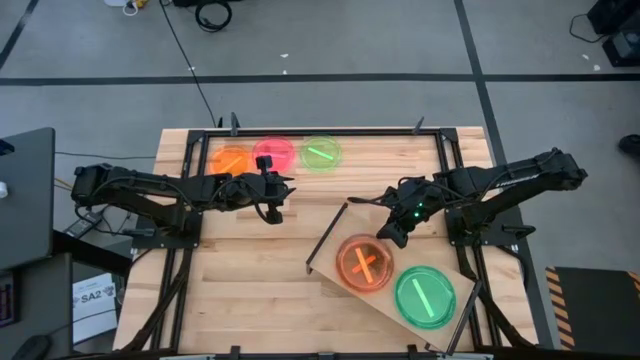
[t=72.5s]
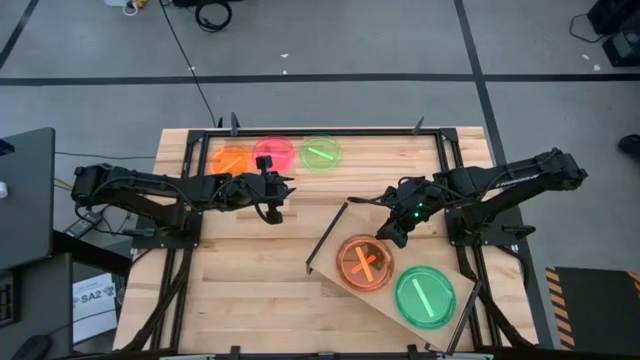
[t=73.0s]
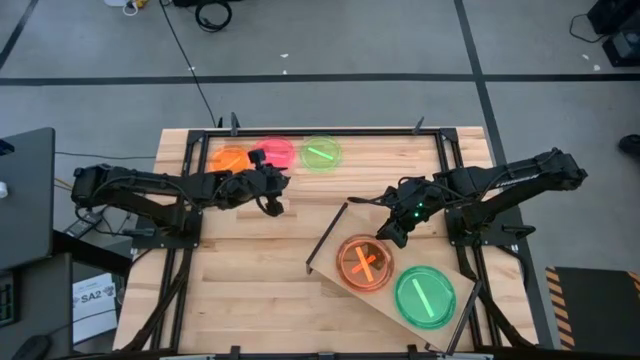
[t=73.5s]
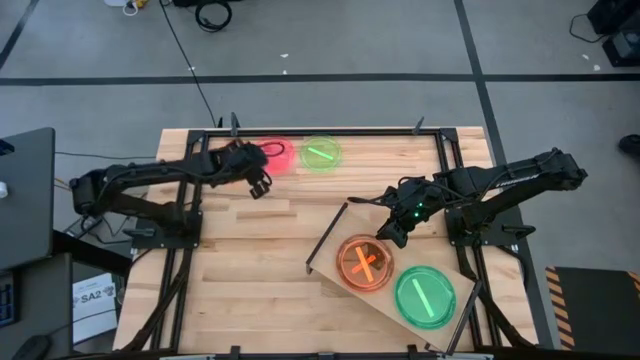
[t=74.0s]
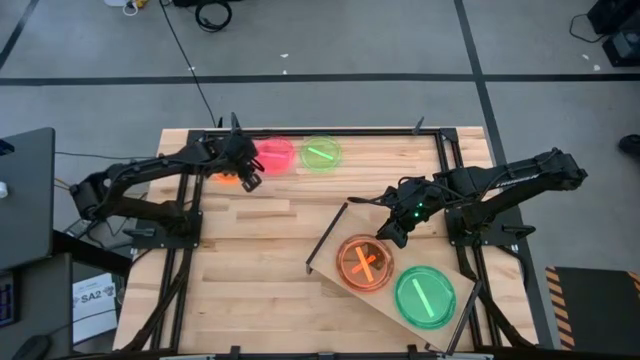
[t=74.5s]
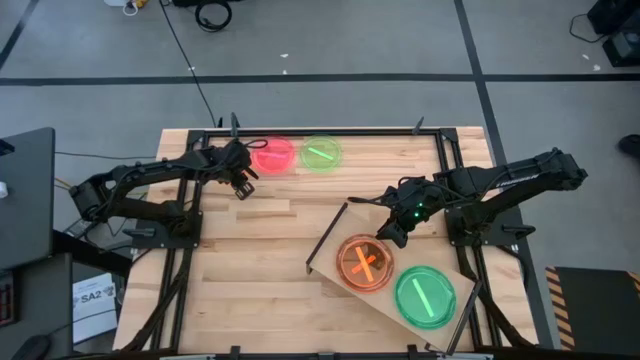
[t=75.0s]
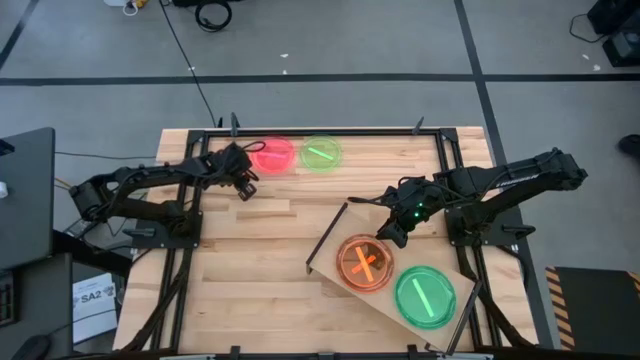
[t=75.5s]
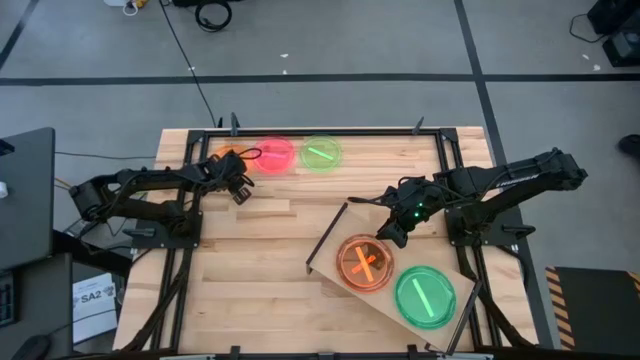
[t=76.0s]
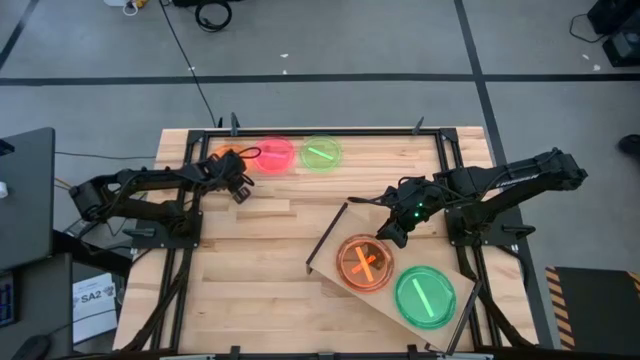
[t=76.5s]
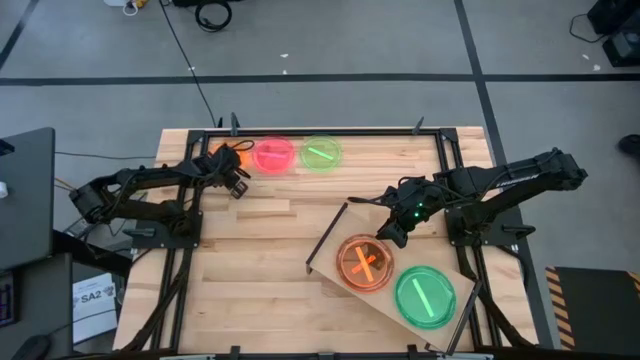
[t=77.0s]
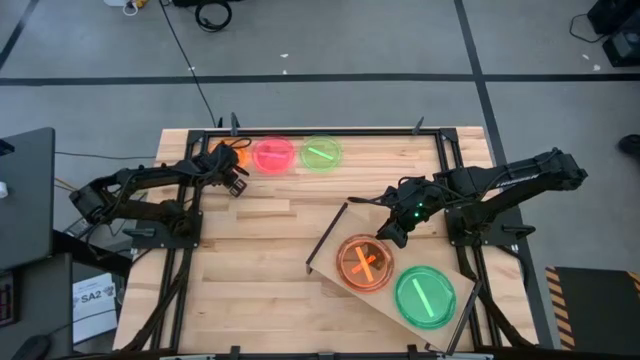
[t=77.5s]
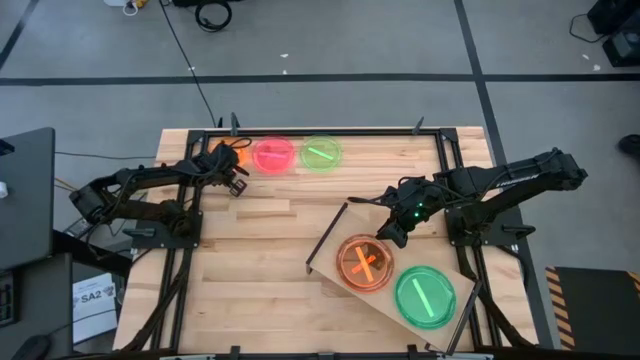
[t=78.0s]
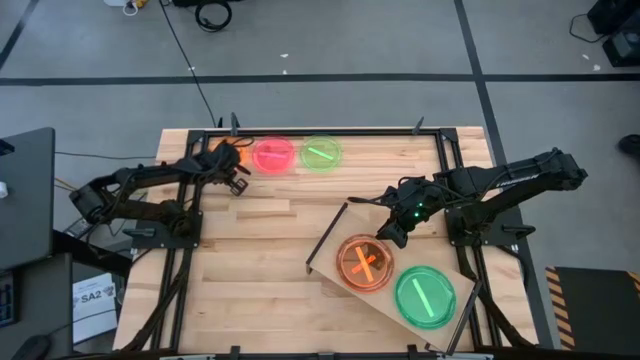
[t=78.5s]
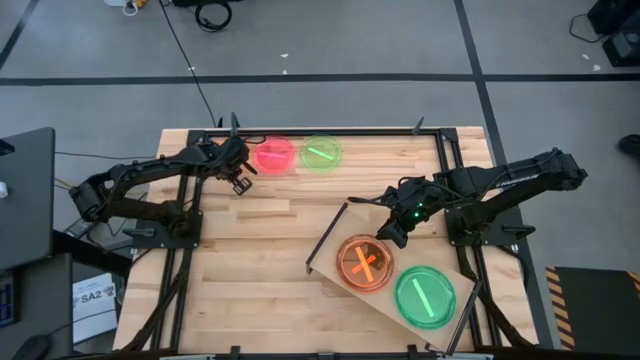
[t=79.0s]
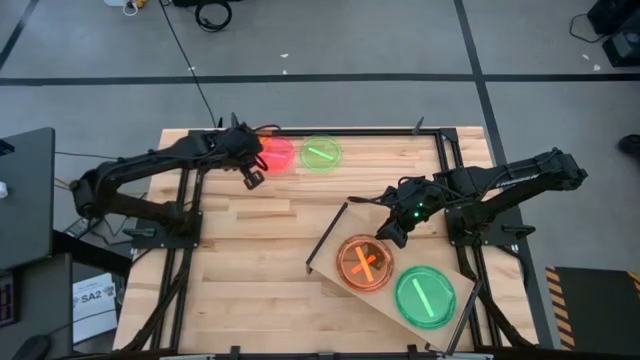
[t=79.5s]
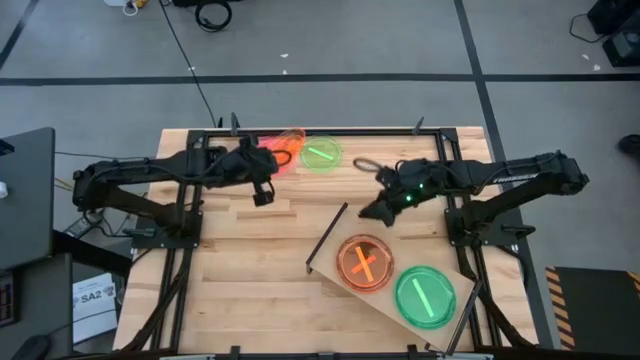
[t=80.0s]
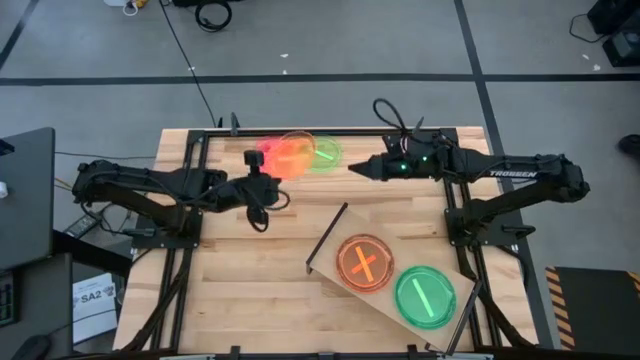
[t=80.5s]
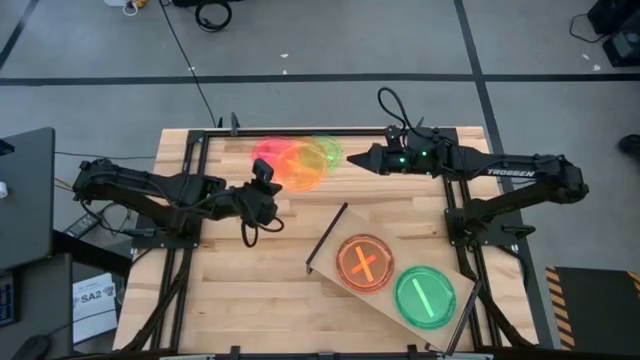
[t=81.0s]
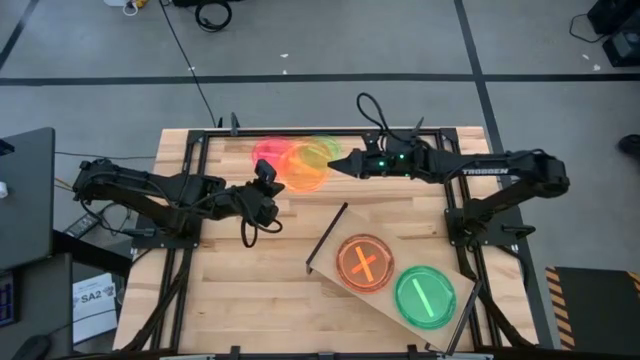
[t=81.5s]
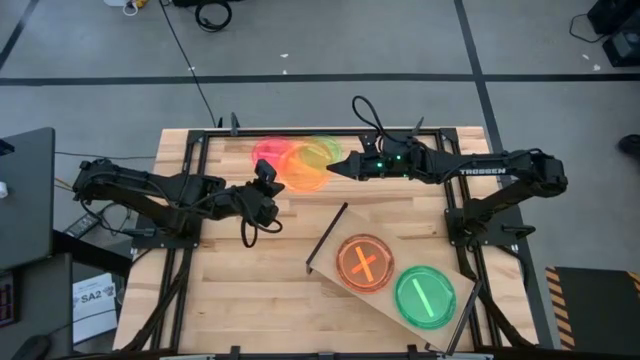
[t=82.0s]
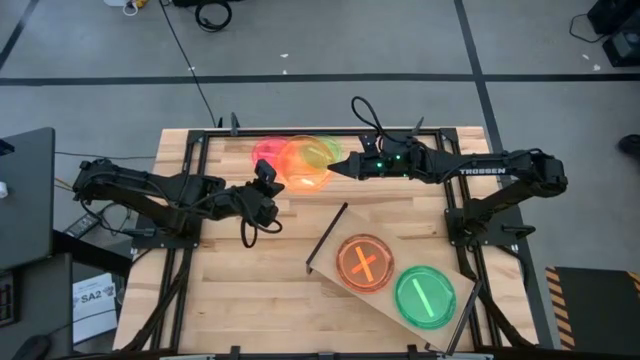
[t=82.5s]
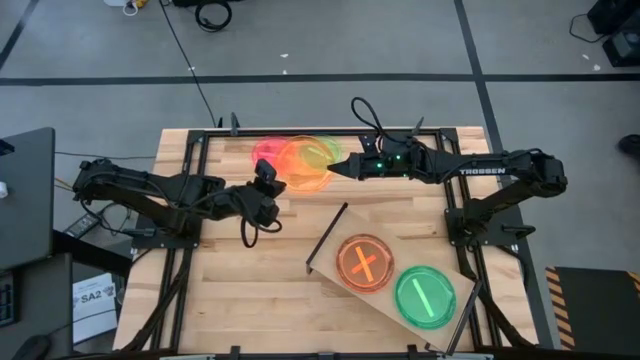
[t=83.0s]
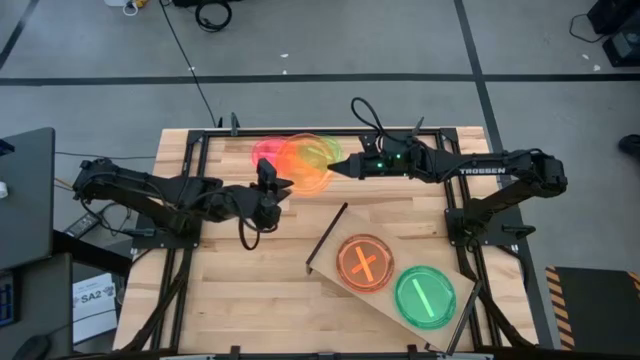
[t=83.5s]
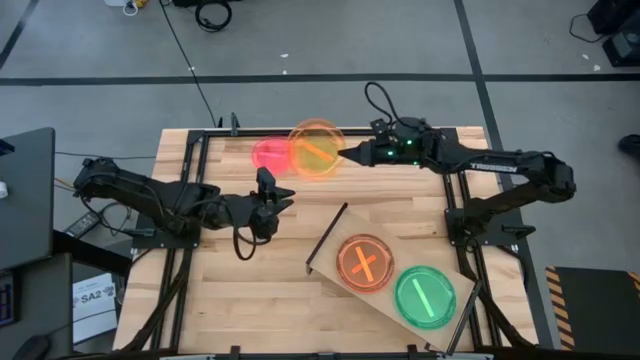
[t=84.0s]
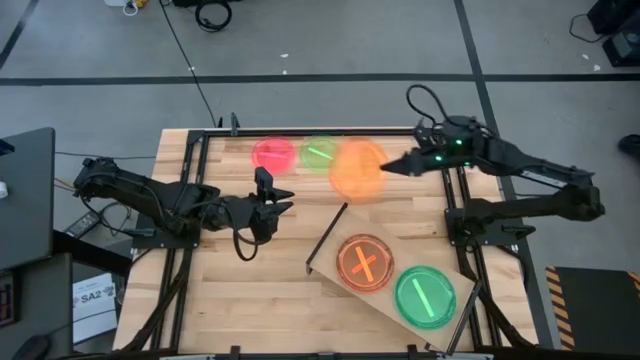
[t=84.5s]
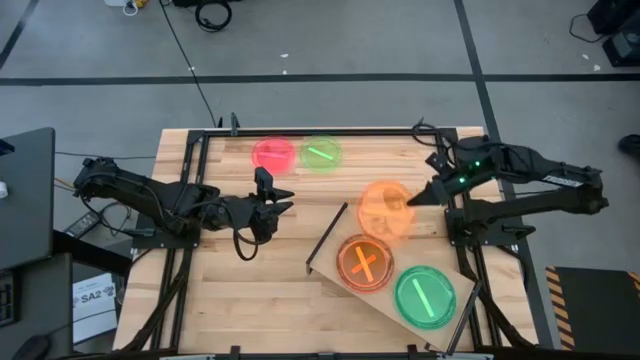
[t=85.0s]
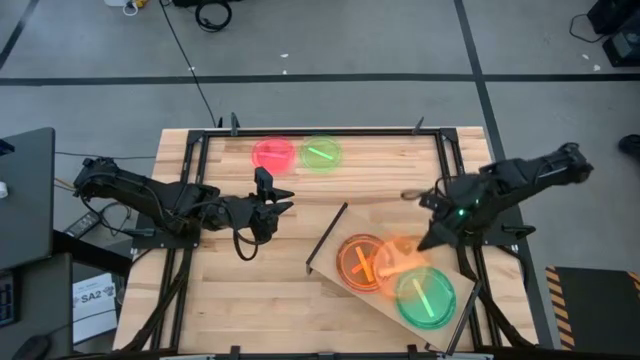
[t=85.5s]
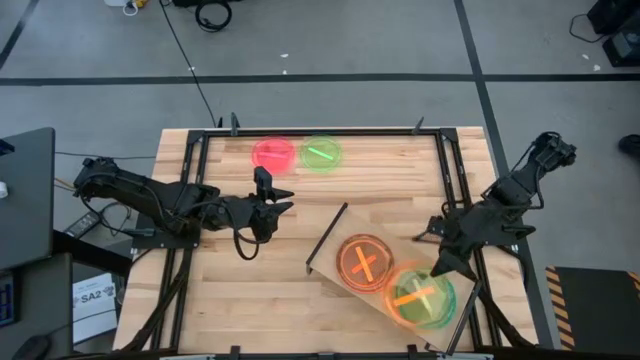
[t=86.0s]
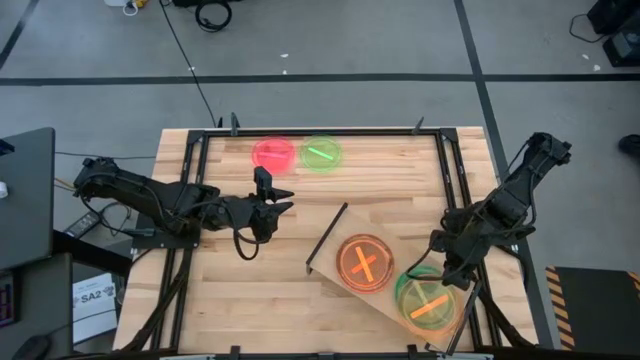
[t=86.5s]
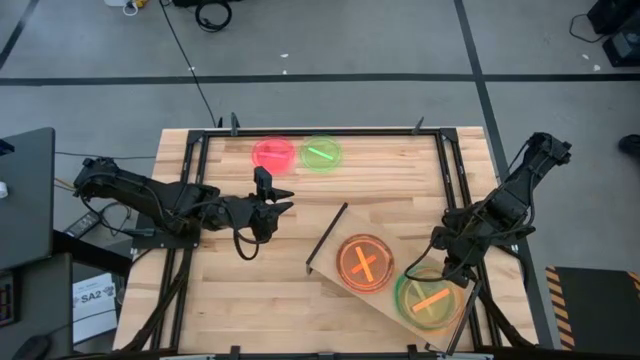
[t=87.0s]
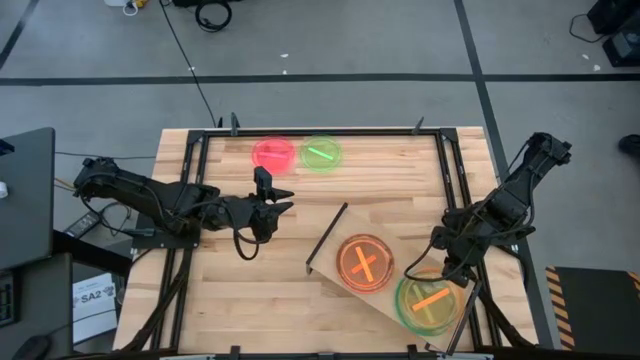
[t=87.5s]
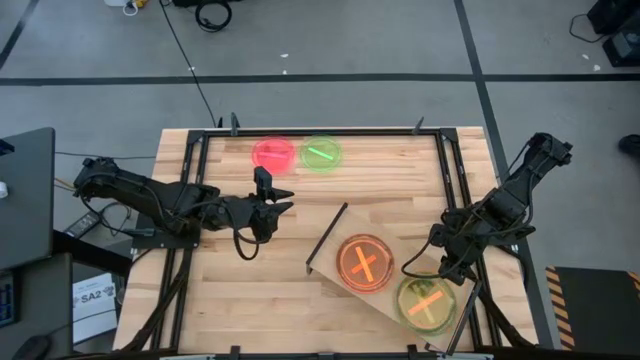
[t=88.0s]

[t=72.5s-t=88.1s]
Task: Place and stack plates onto a shelf
Stack the transparent orange plate on the transparent green plate on the shelf

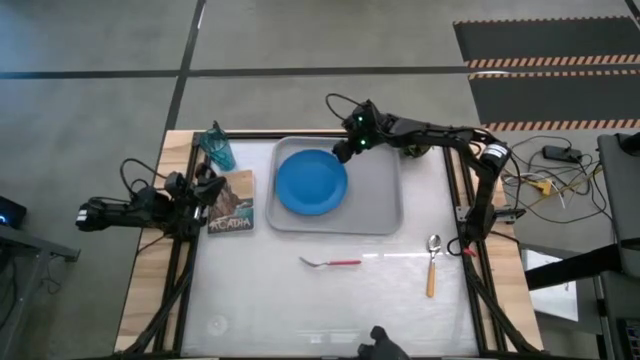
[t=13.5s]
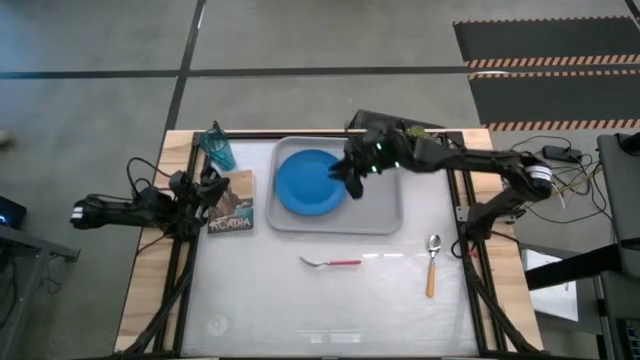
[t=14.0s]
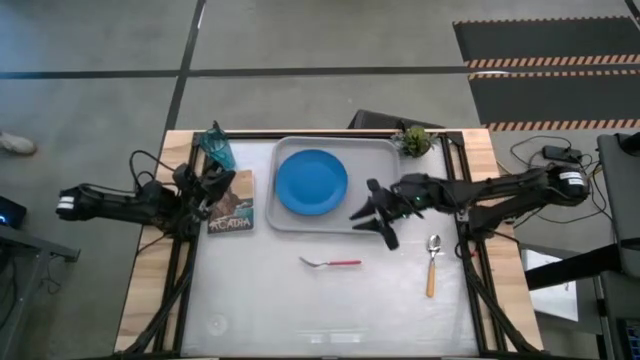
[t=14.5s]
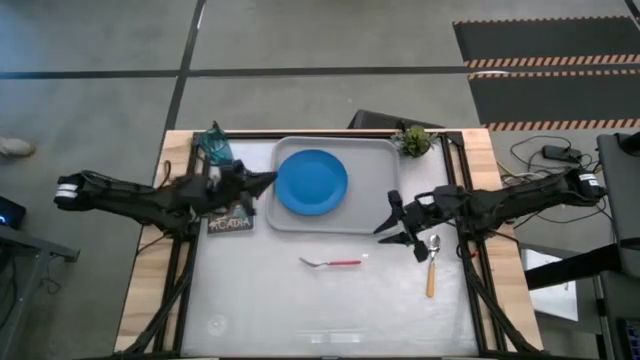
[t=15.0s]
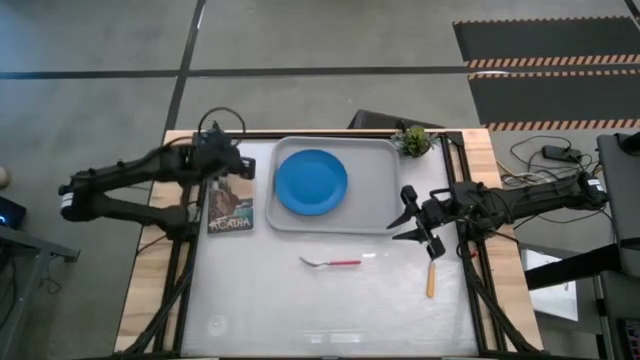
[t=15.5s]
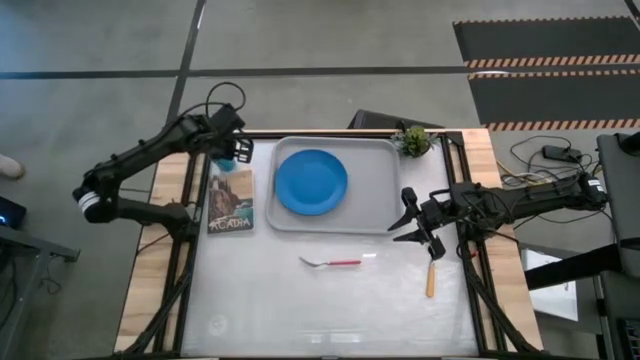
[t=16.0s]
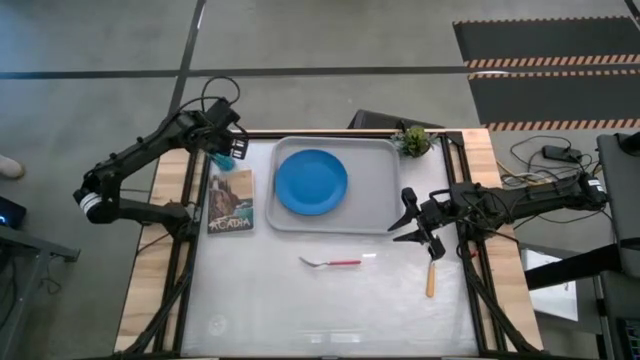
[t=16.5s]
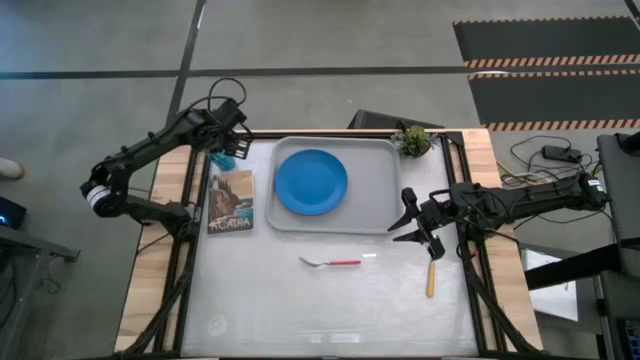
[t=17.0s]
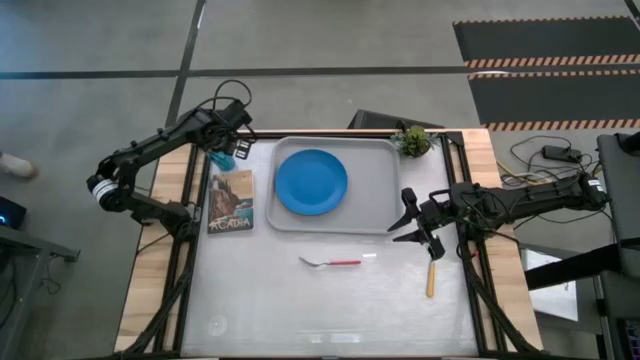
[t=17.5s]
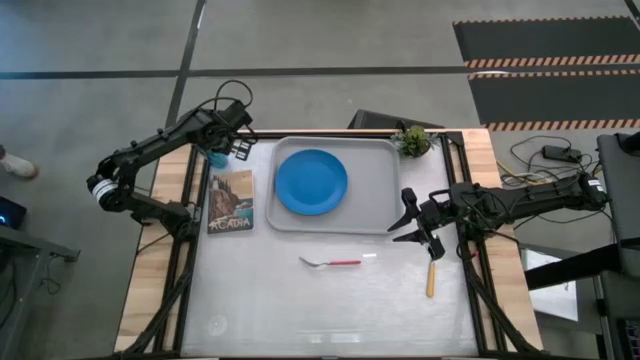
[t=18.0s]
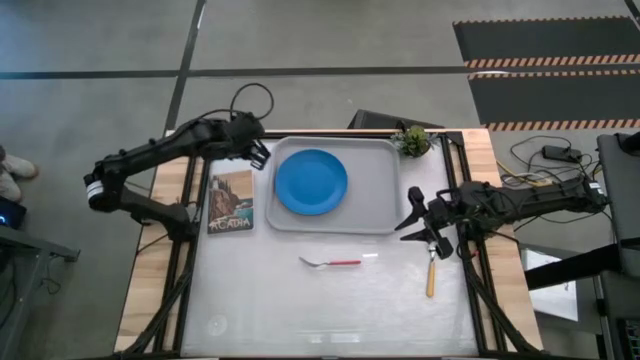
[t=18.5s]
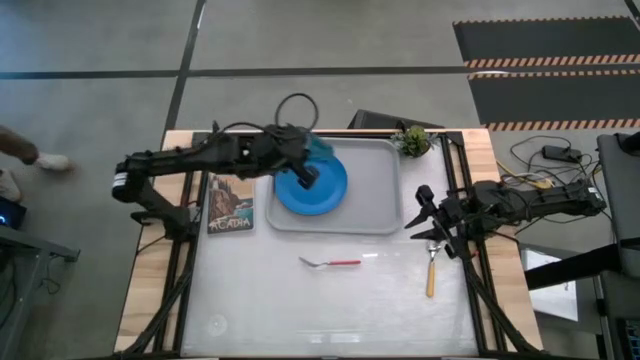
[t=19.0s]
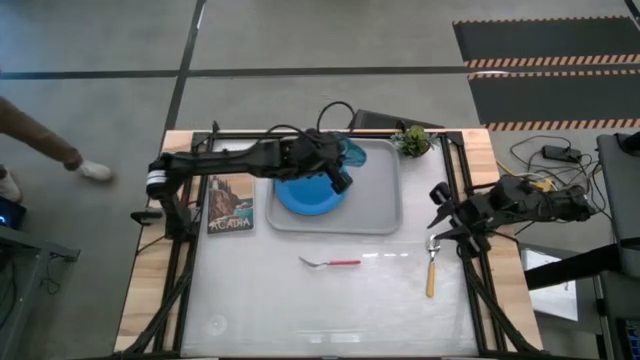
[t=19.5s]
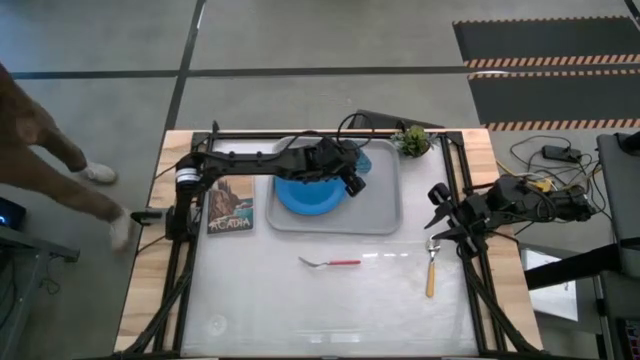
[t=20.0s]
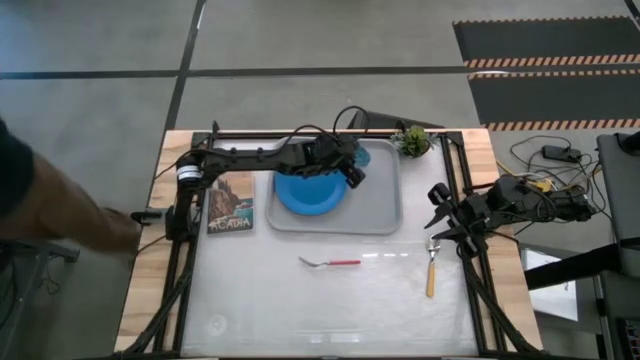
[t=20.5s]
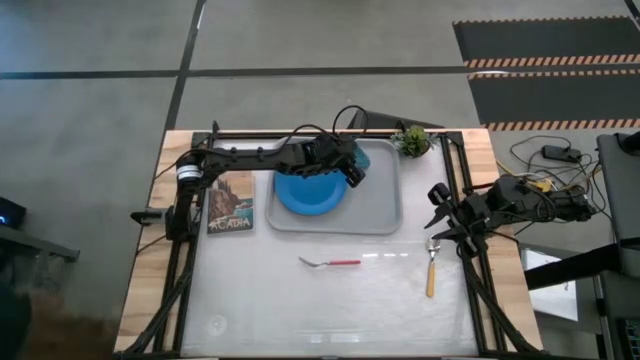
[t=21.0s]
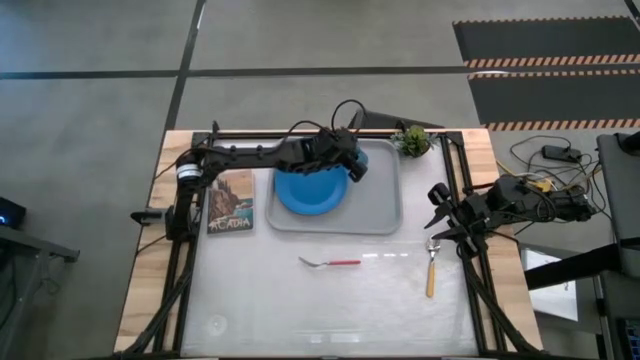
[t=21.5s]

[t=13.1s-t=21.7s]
Task: Pick and place plate/cup/fork/spoon on tray
Put the blue cup beside the blue plate on the gray tray
